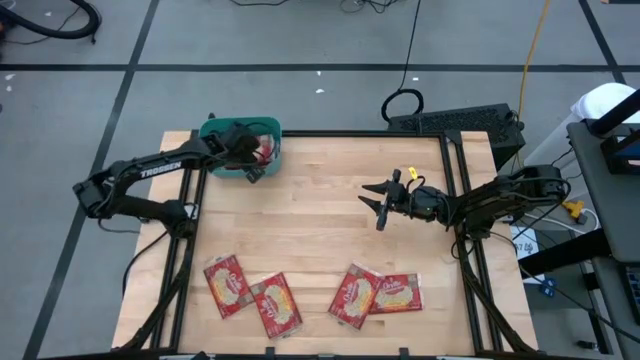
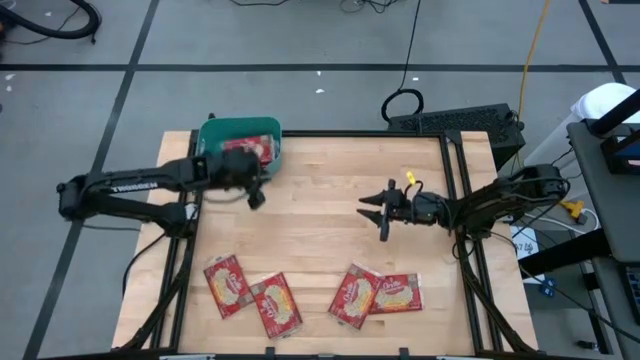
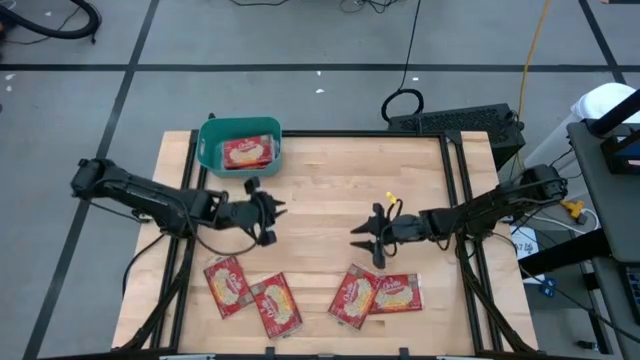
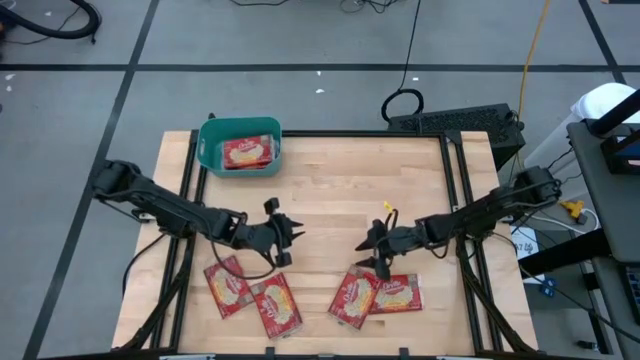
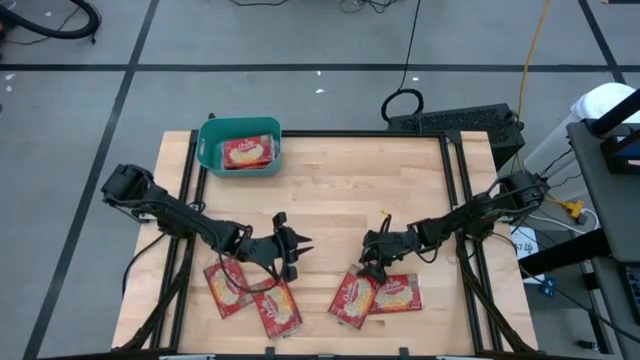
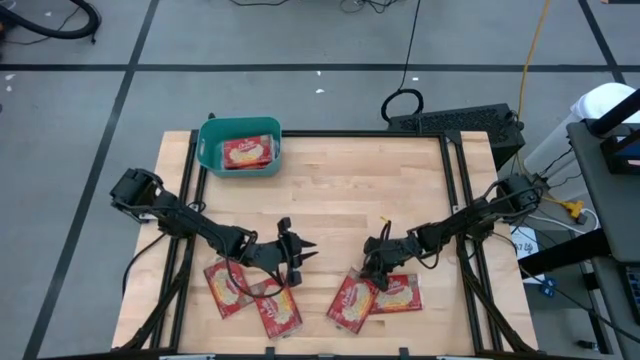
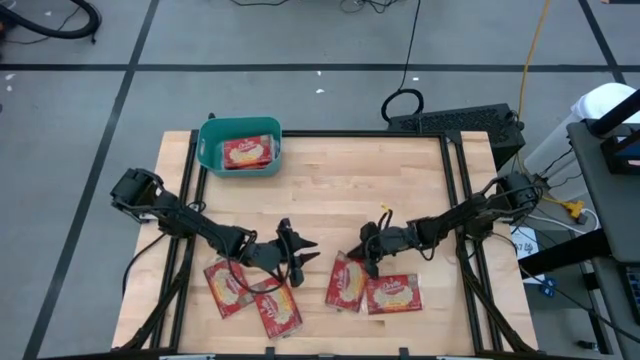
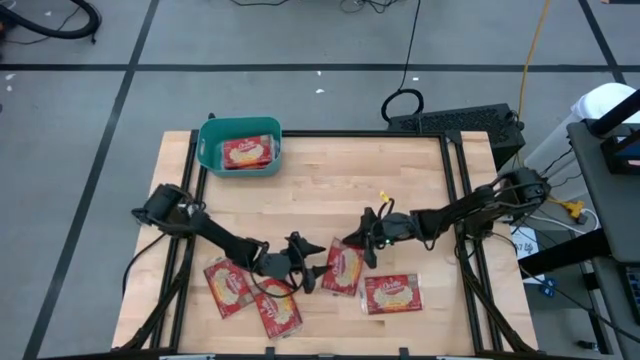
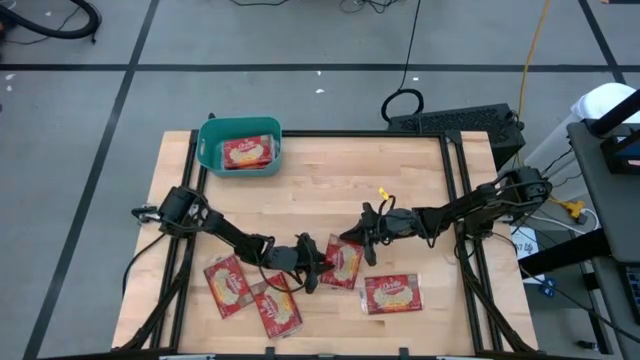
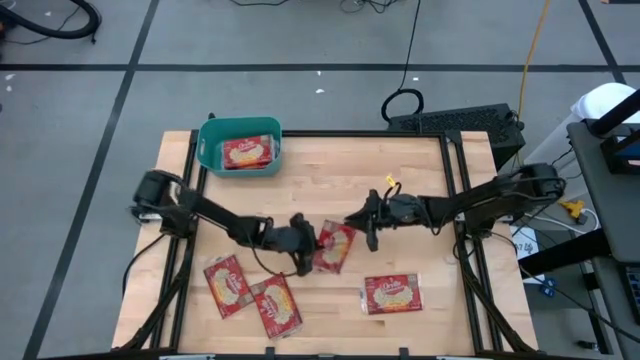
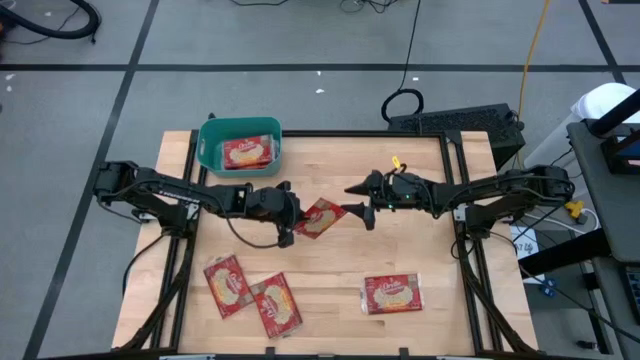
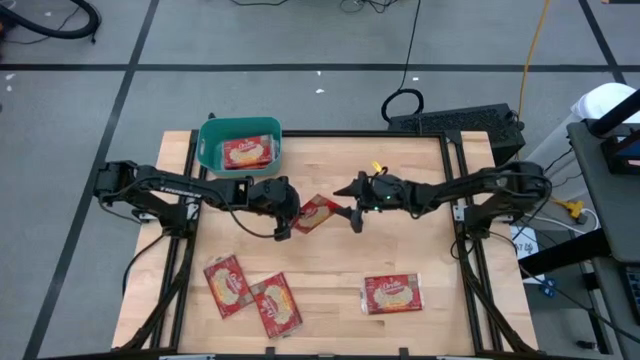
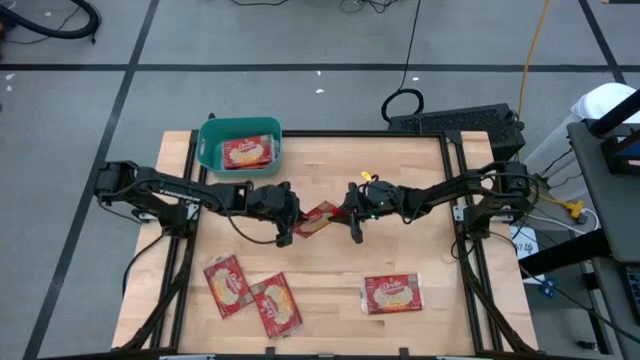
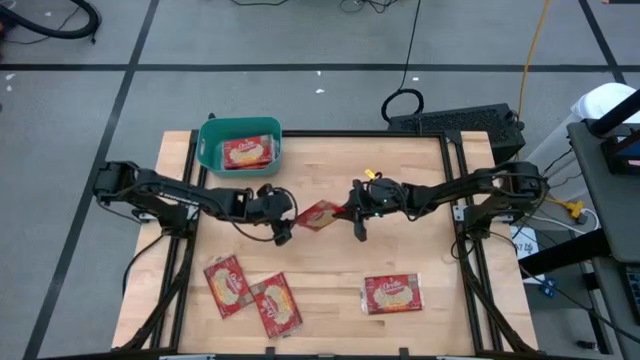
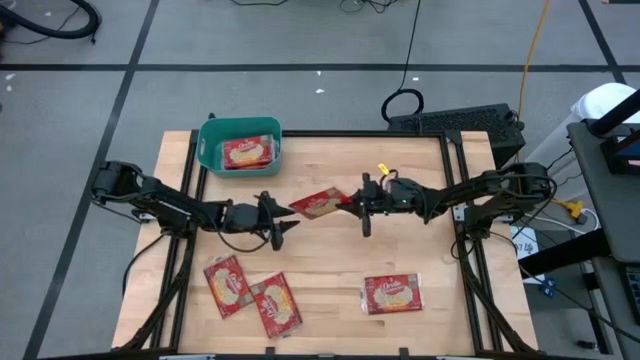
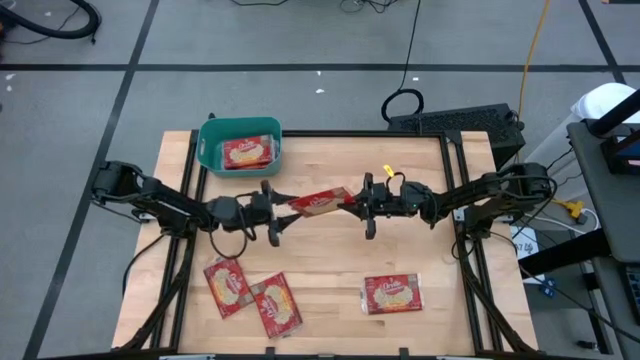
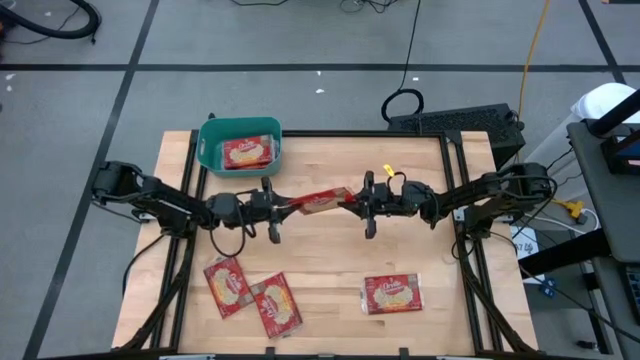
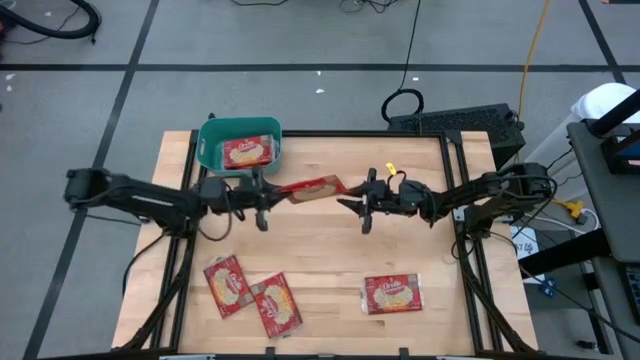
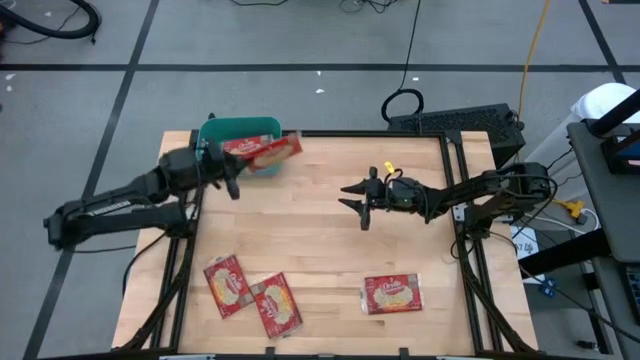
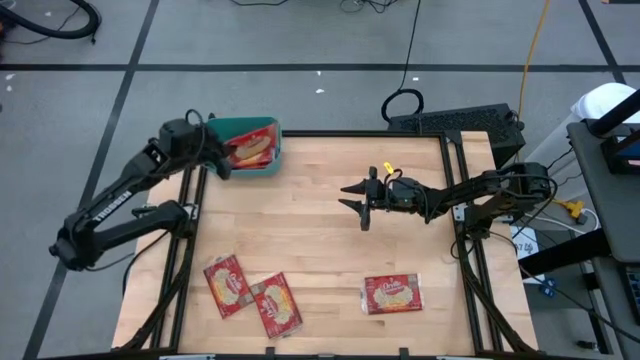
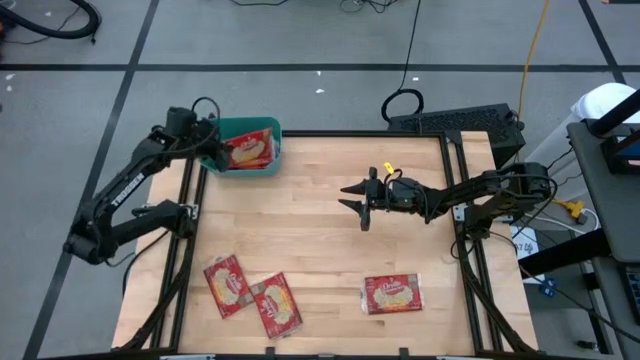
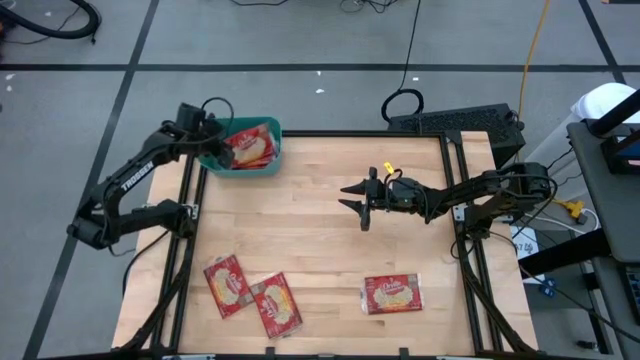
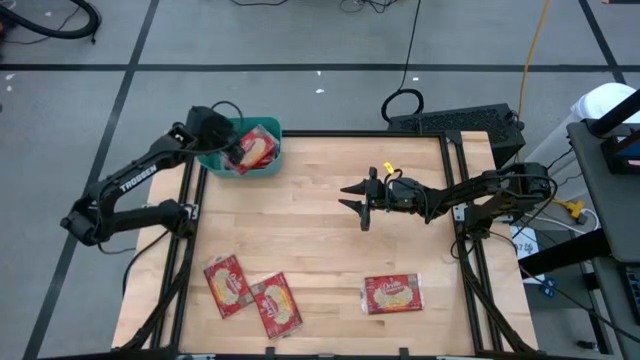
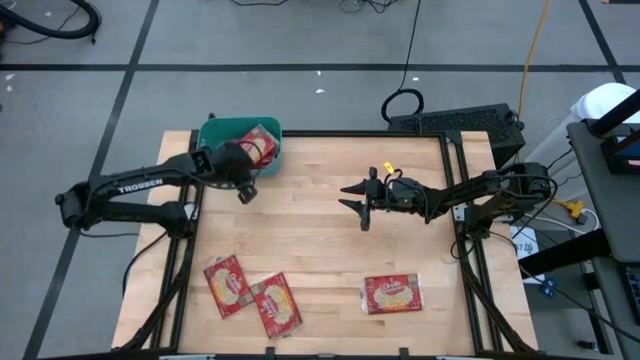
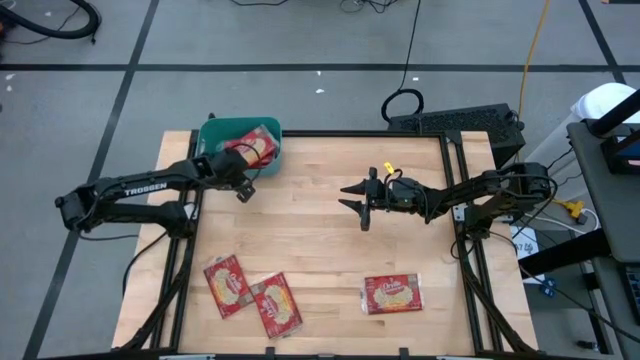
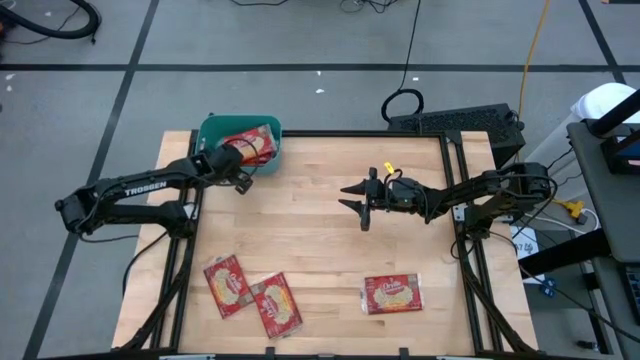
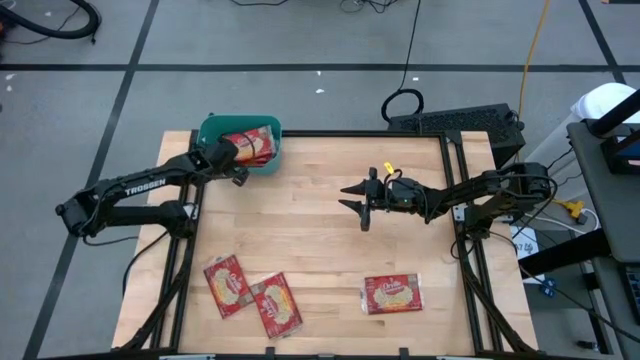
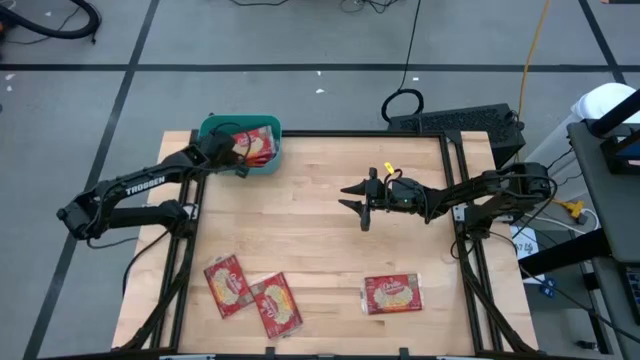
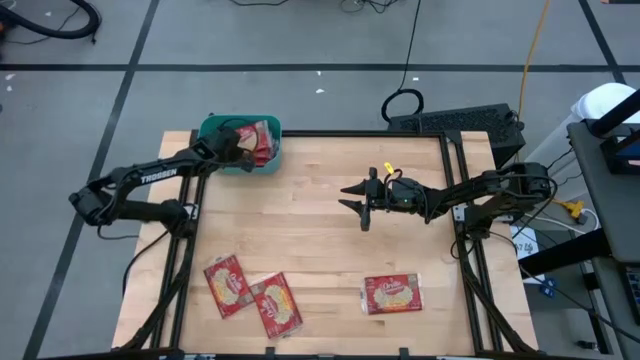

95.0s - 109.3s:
Task: Sort popcorn bags into baskets
Put the red popcorn bag into the green bin

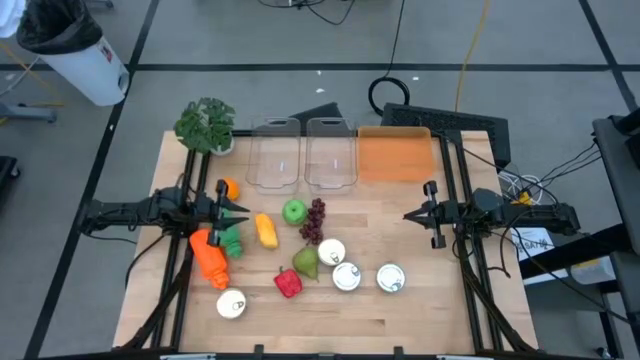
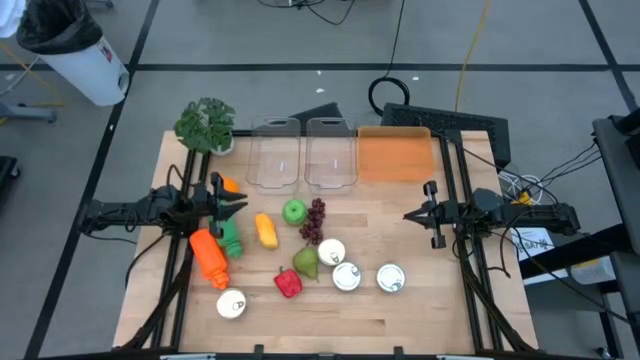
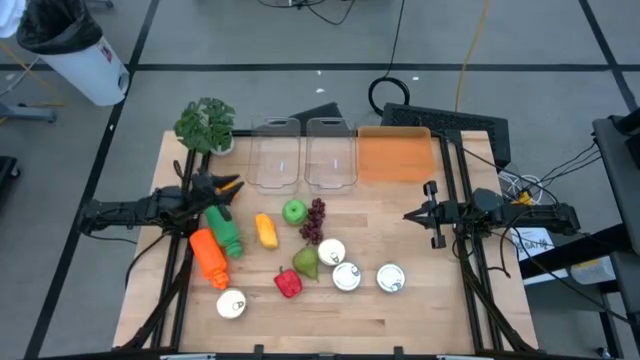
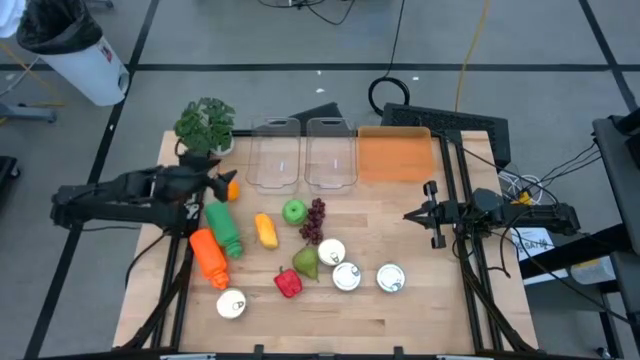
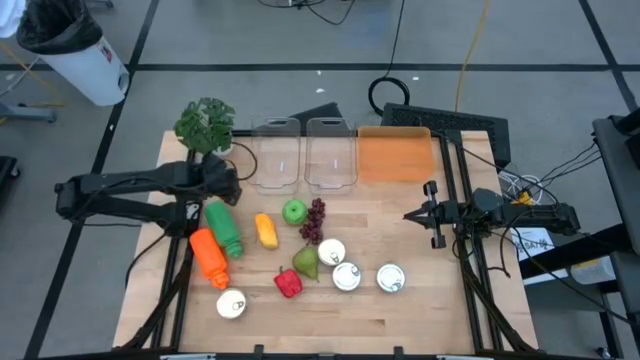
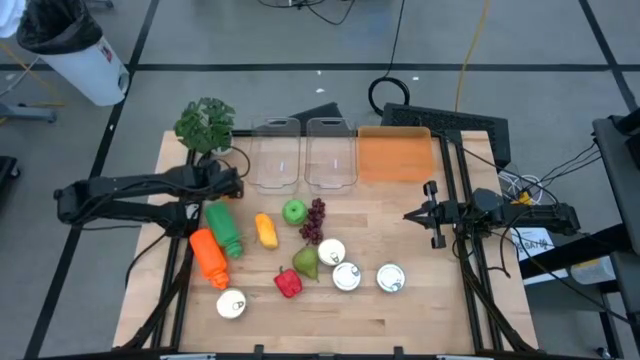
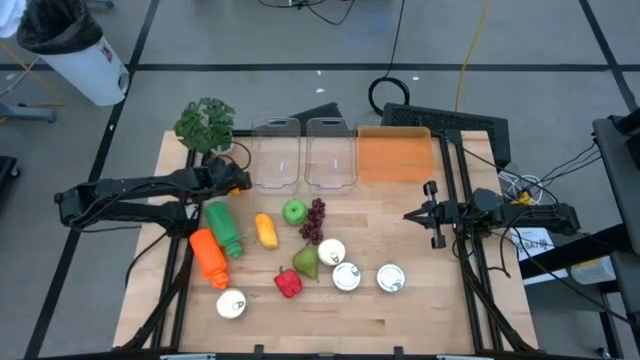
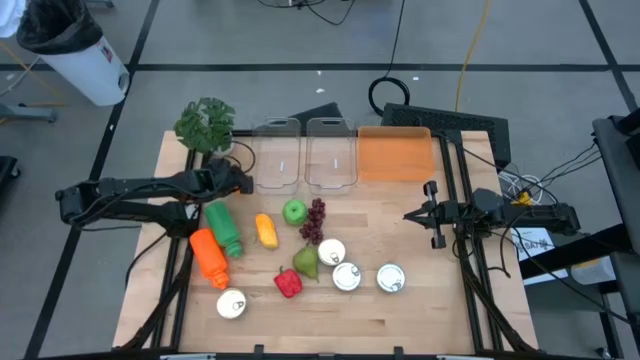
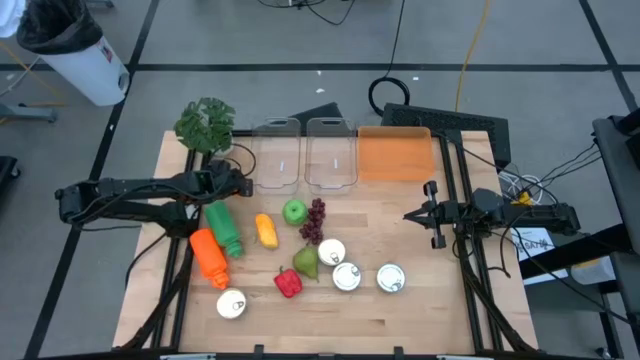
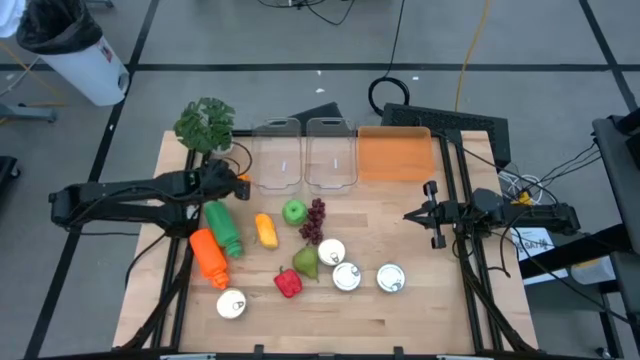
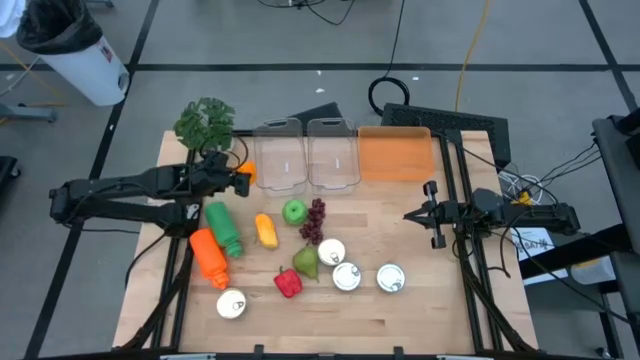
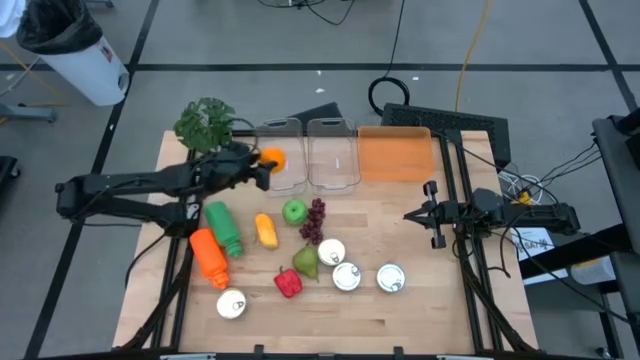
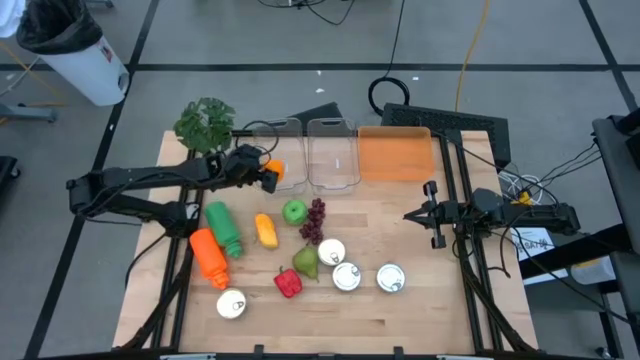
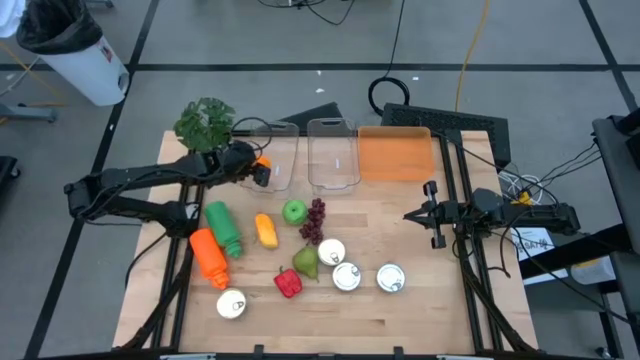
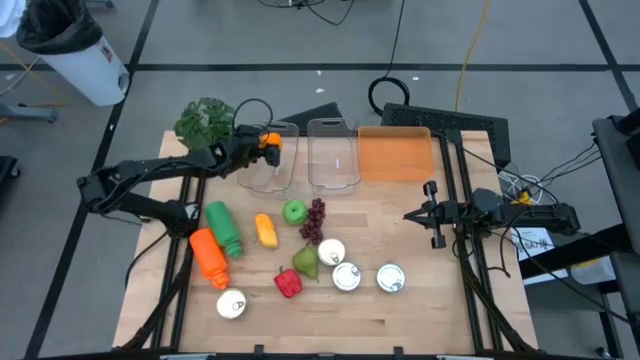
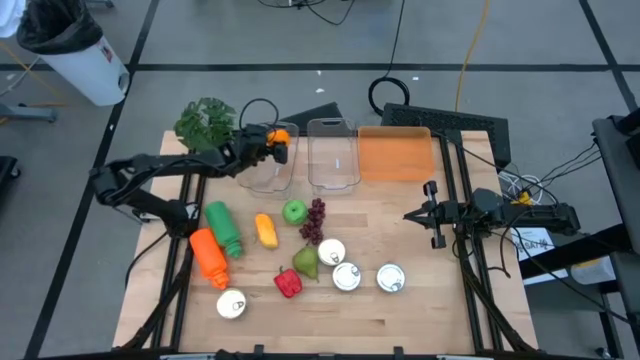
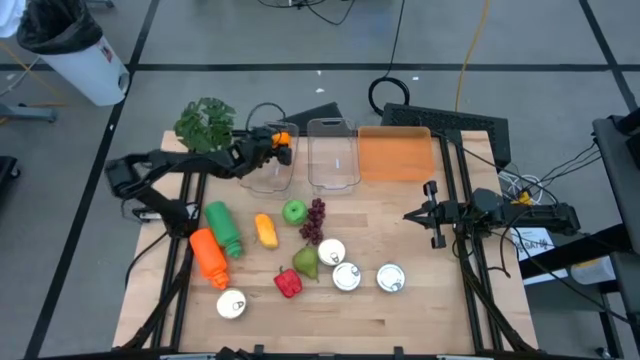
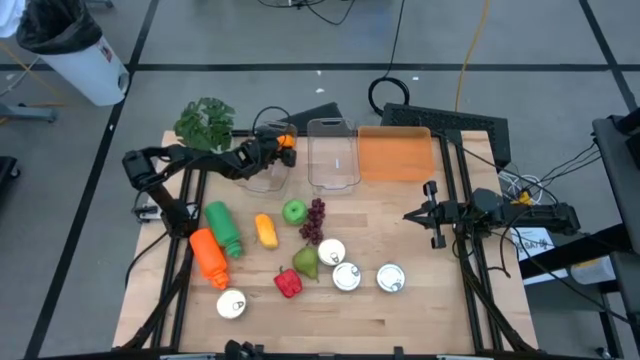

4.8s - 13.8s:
Task: Pick & Place Food Item
Put the orange into the left transparent bin
